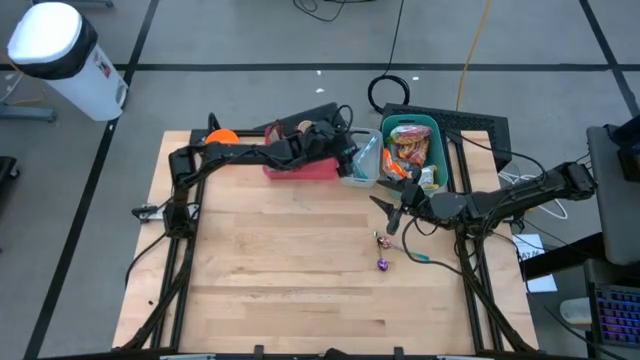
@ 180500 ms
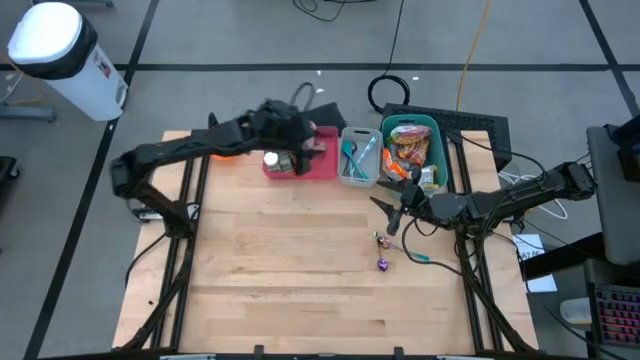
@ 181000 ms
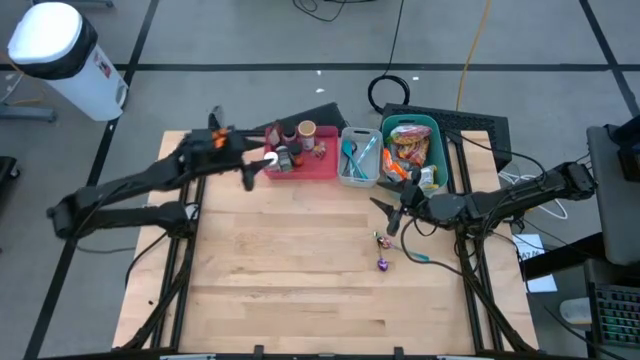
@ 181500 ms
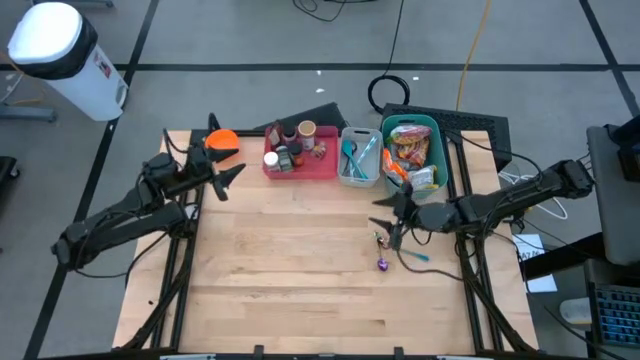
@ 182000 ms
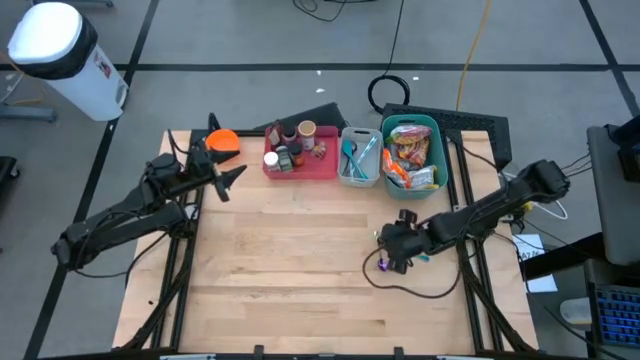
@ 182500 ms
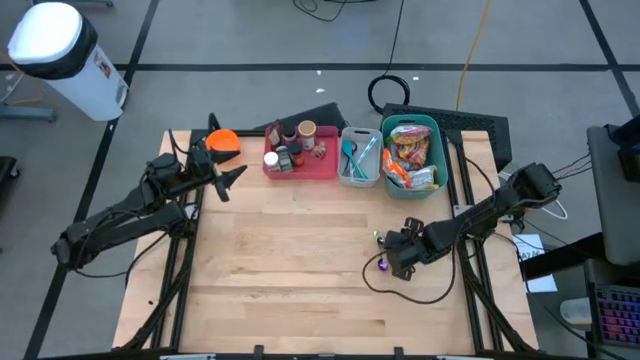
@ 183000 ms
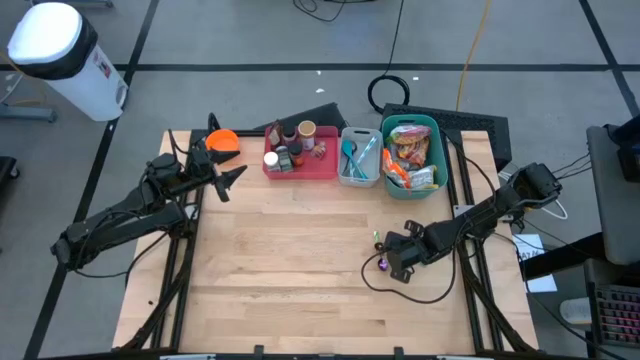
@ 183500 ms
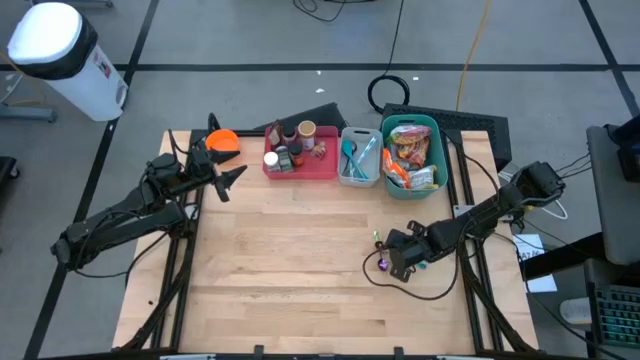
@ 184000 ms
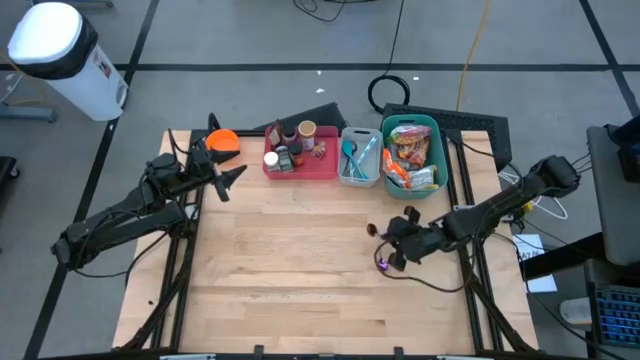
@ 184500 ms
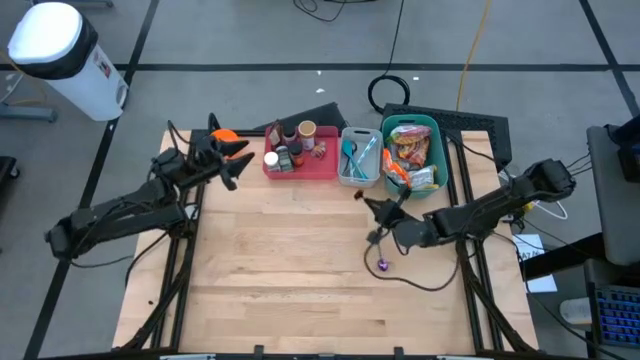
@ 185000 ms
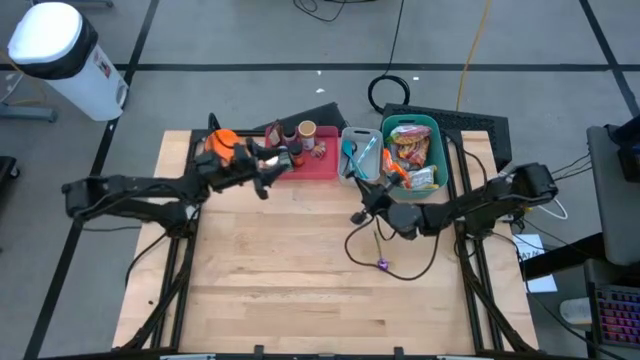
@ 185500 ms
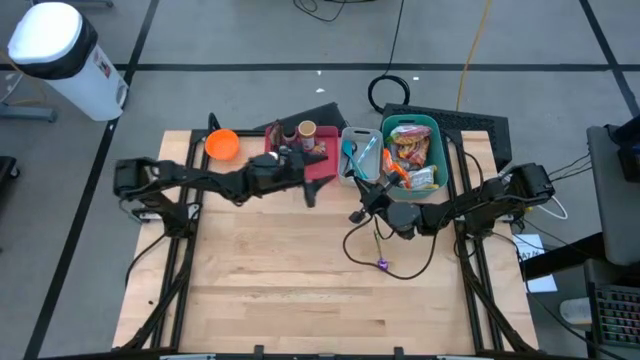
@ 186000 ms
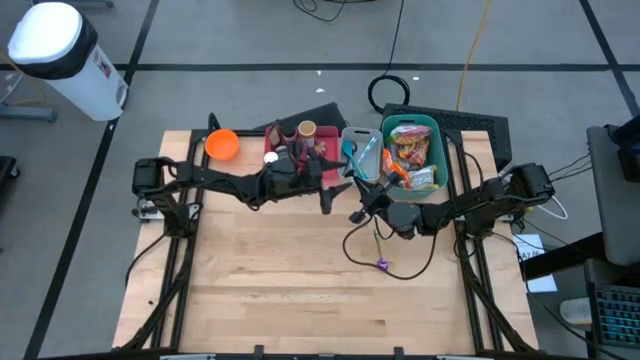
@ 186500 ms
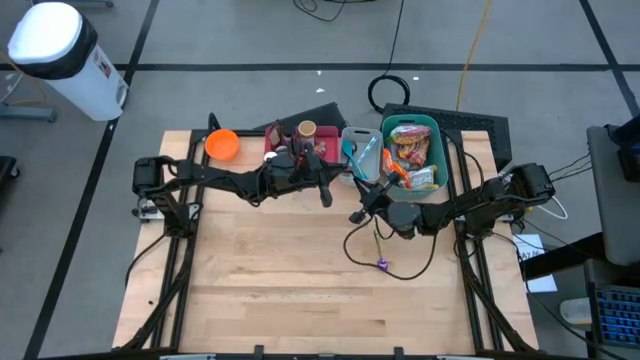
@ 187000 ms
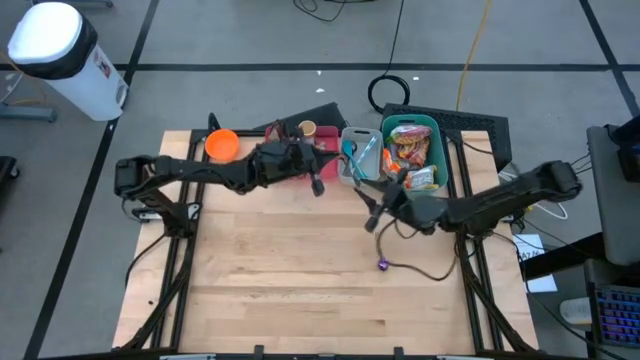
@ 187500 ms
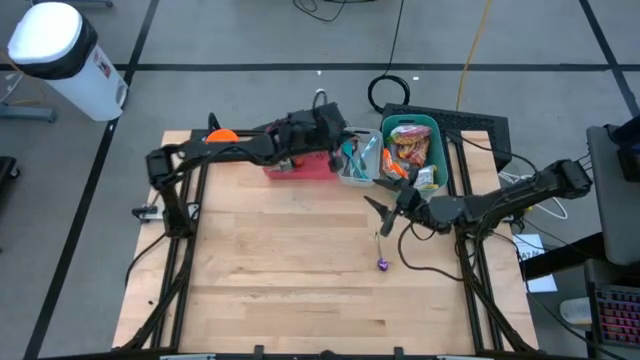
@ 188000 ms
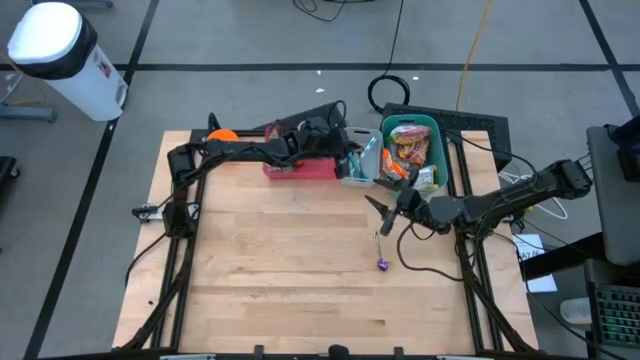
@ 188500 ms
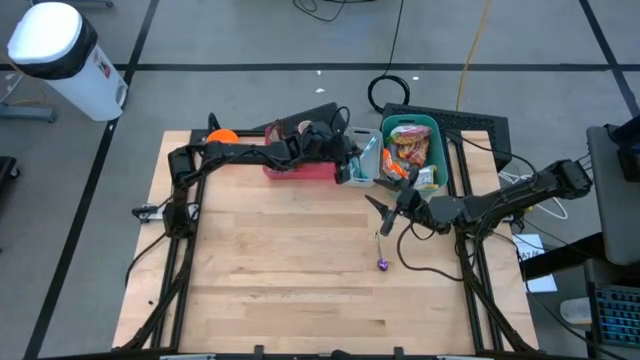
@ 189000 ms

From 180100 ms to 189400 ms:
Task: Pick & Place Food Item
Put the right purple spoon into the white bin

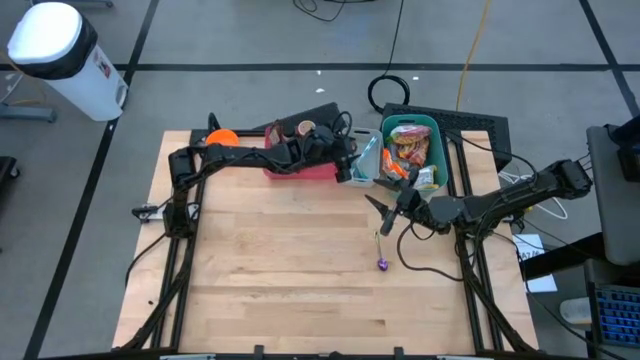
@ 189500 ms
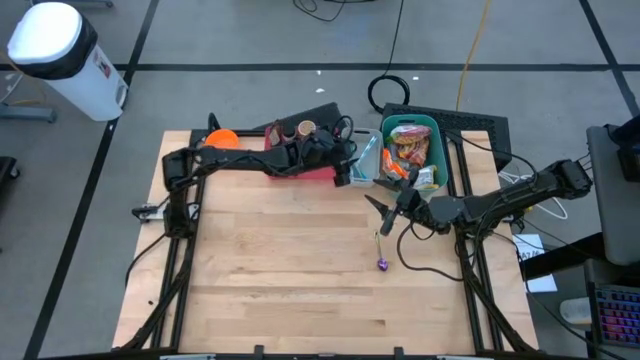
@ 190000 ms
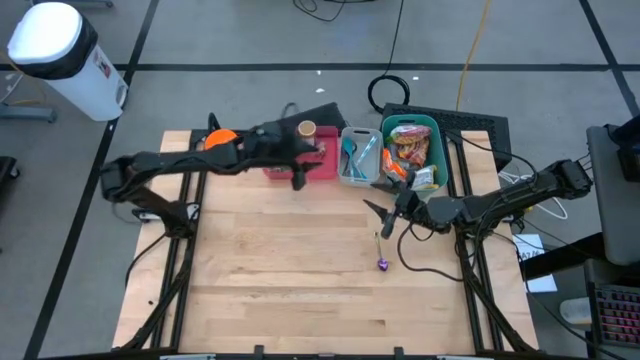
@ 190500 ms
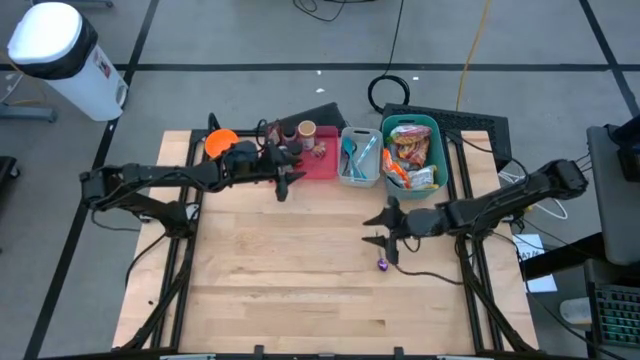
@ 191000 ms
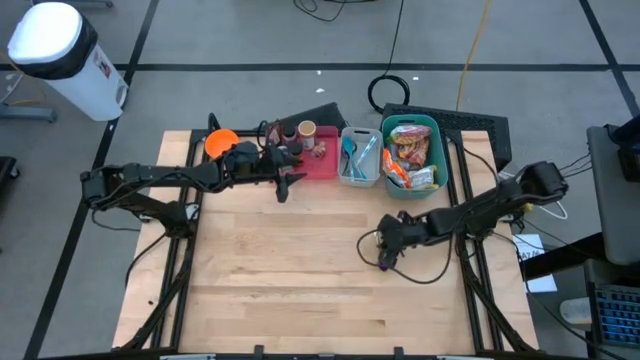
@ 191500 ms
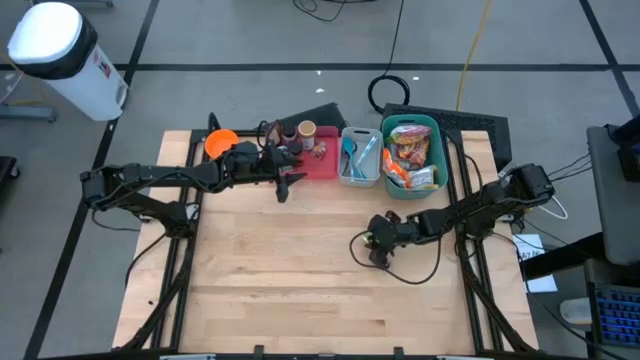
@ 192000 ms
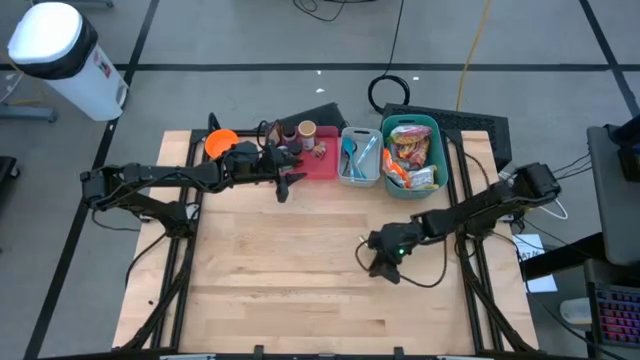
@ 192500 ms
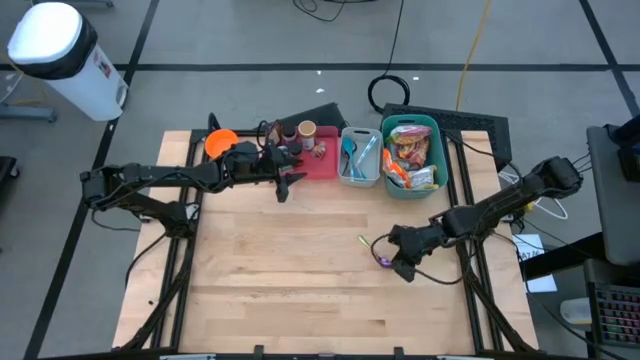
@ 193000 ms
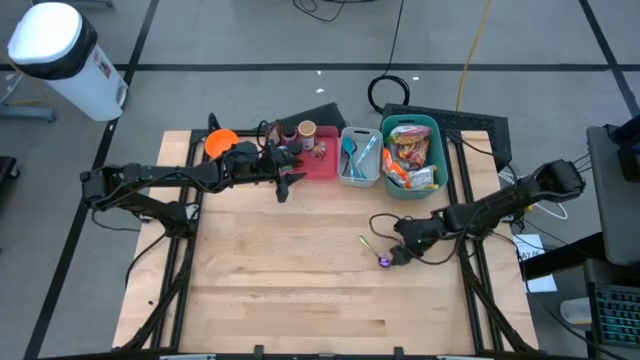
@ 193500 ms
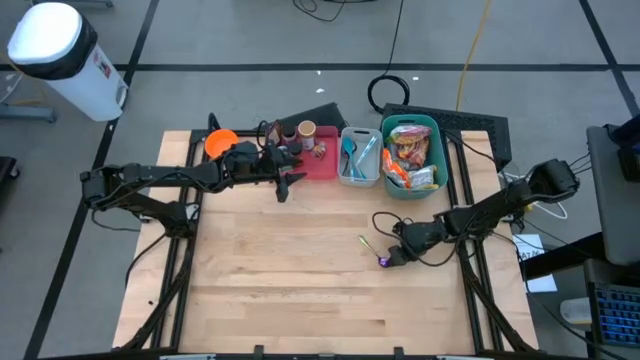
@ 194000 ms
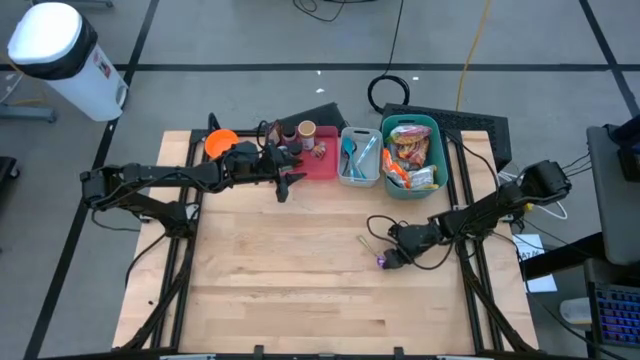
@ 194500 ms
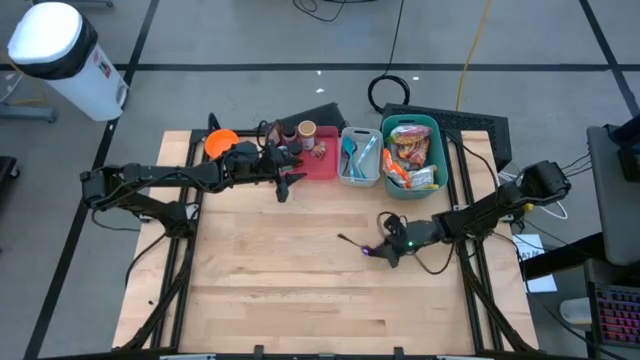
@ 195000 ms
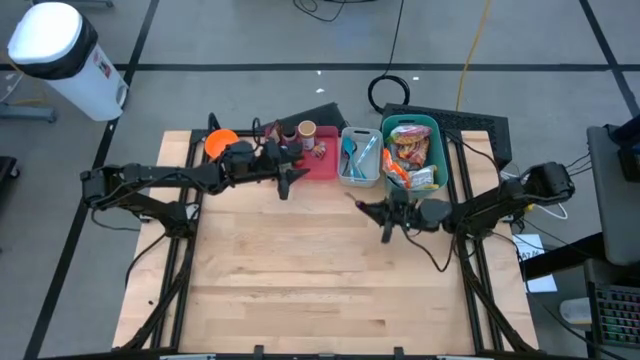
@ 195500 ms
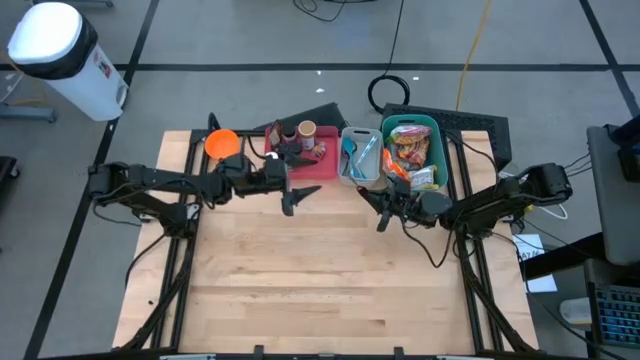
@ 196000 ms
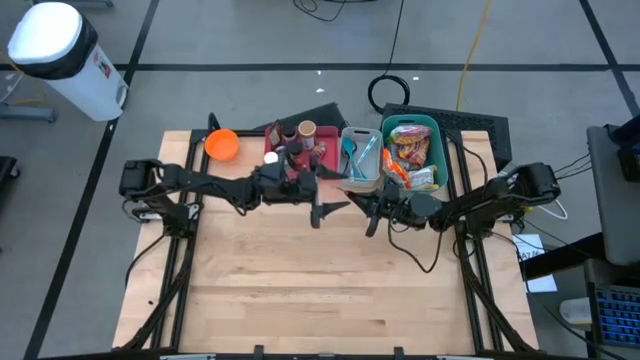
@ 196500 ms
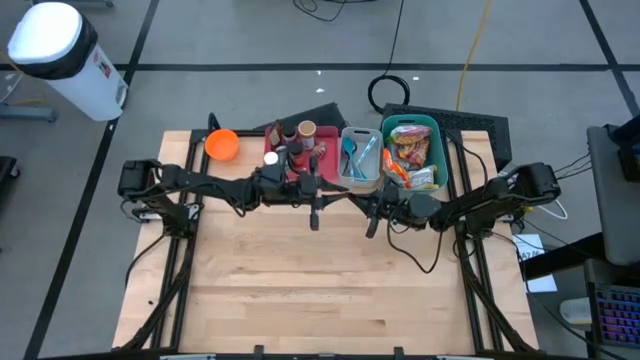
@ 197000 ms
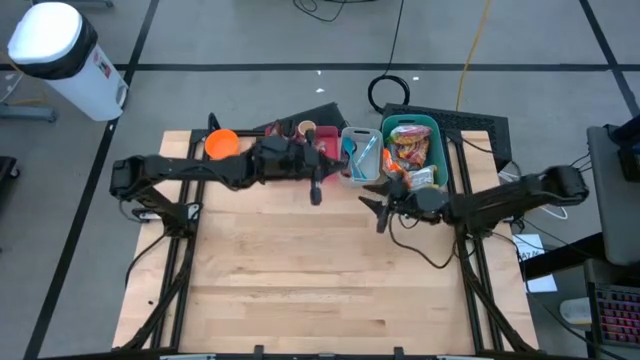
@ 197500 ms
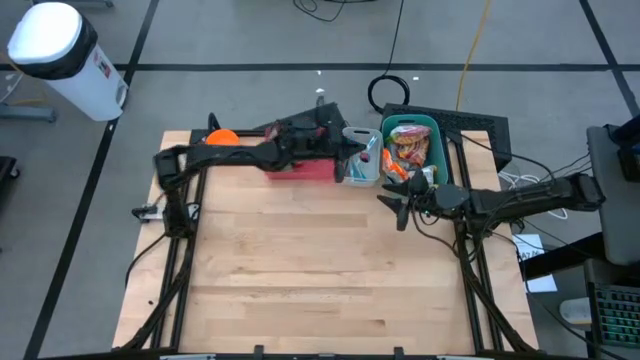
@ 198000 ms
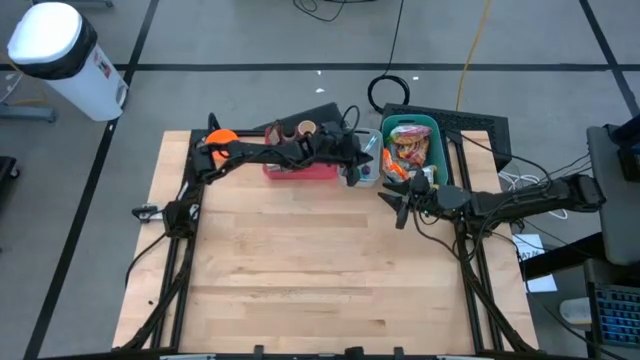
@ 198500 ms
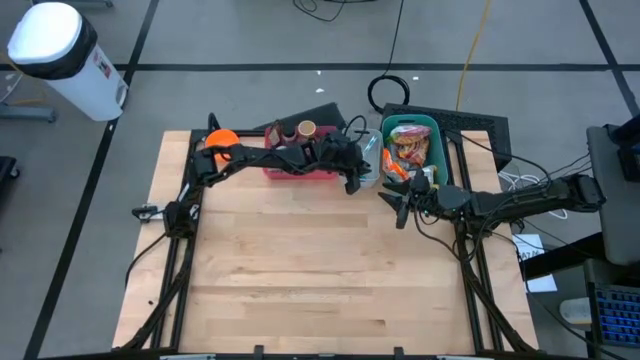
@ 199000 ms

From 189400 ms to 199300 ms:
Put the purple spoon into the white bin
